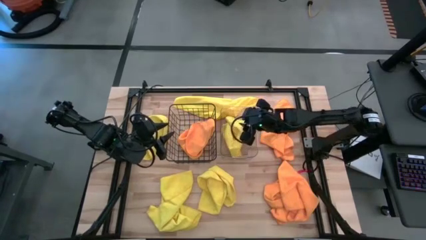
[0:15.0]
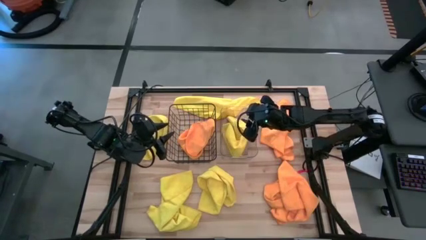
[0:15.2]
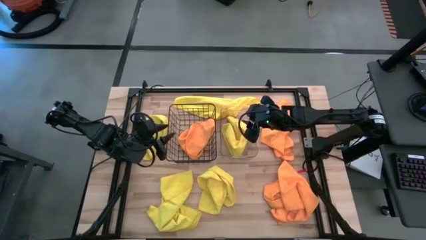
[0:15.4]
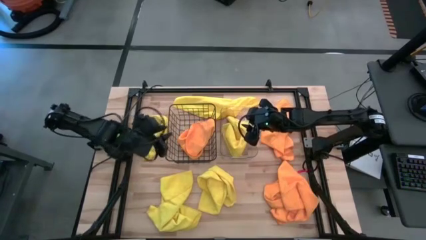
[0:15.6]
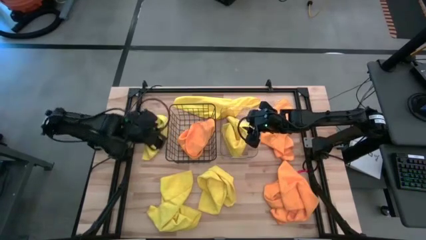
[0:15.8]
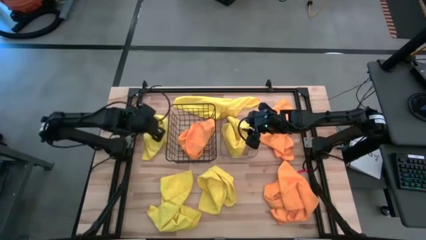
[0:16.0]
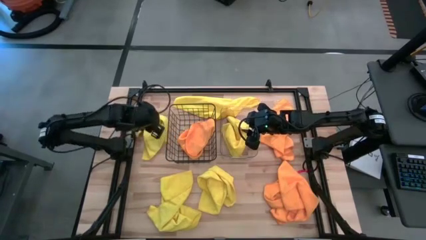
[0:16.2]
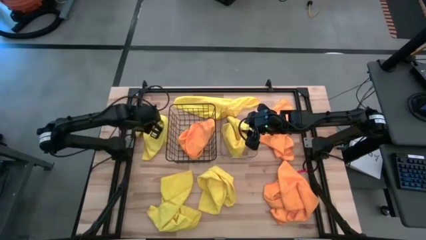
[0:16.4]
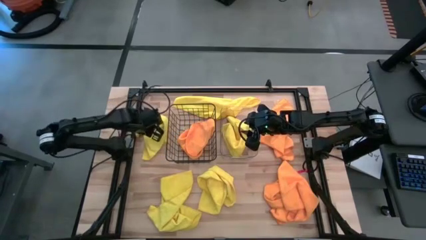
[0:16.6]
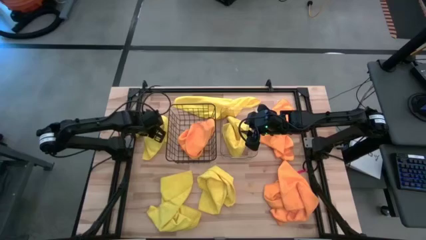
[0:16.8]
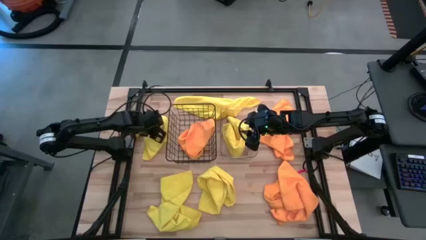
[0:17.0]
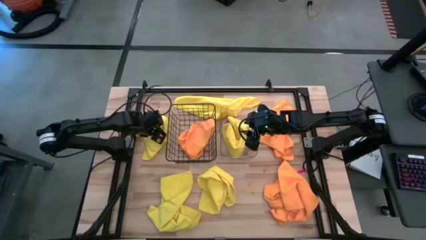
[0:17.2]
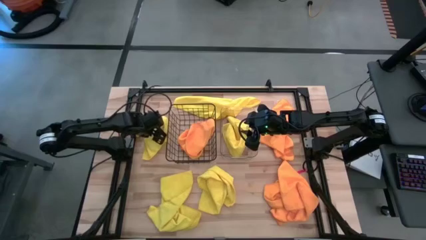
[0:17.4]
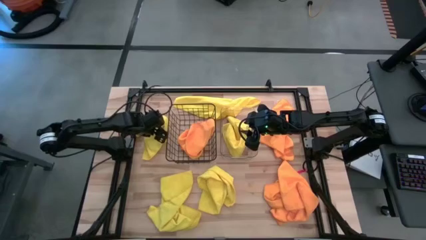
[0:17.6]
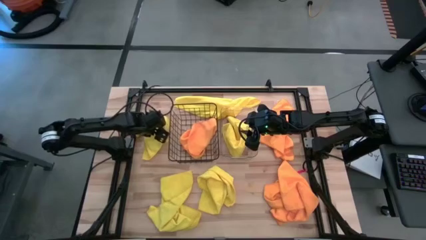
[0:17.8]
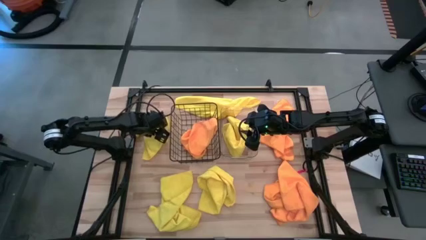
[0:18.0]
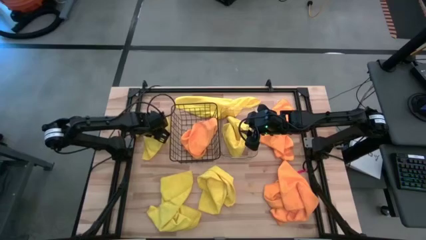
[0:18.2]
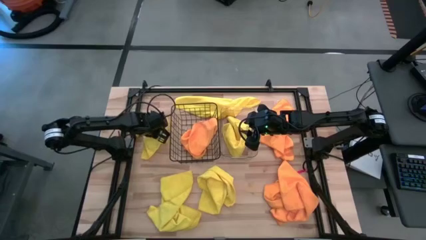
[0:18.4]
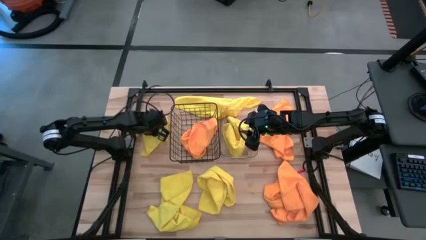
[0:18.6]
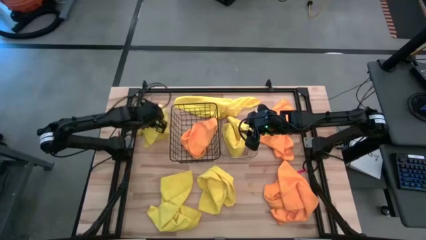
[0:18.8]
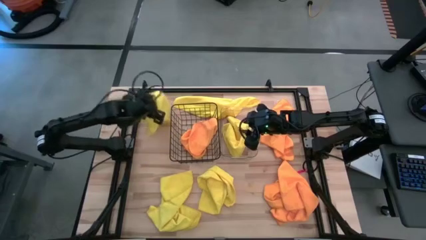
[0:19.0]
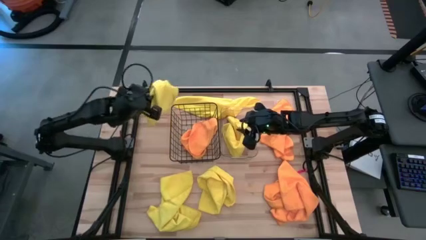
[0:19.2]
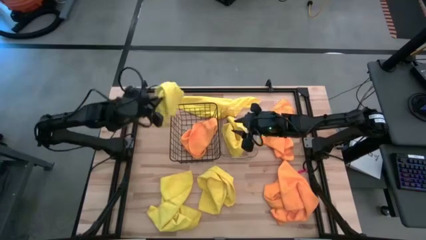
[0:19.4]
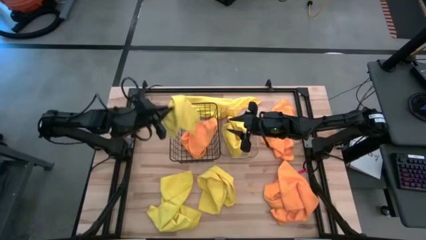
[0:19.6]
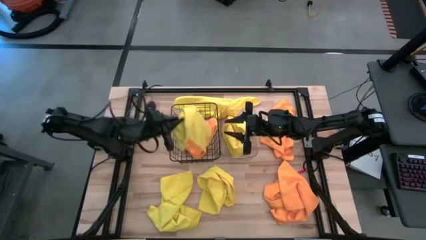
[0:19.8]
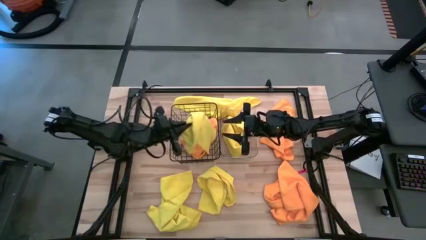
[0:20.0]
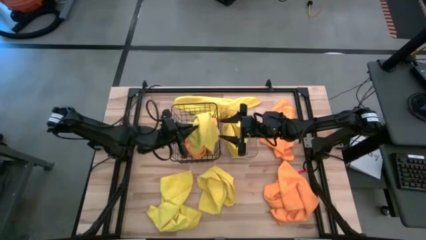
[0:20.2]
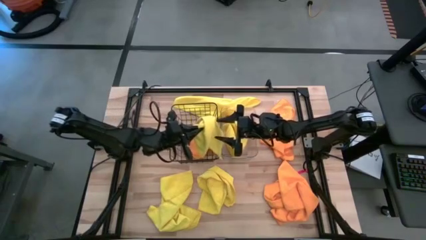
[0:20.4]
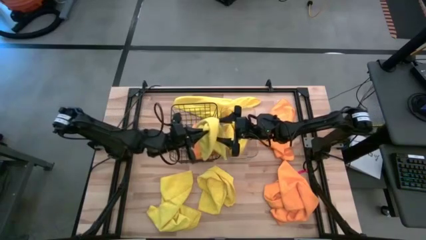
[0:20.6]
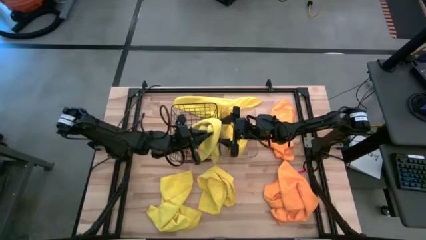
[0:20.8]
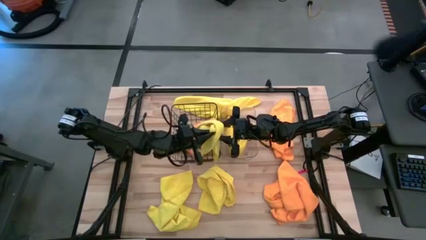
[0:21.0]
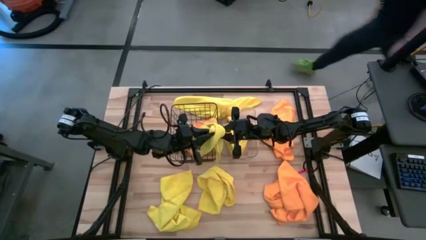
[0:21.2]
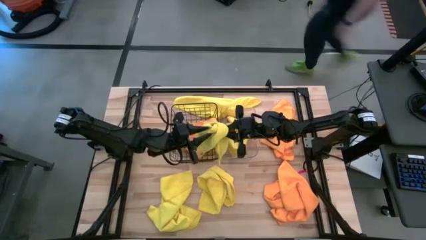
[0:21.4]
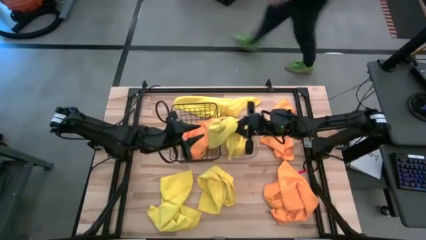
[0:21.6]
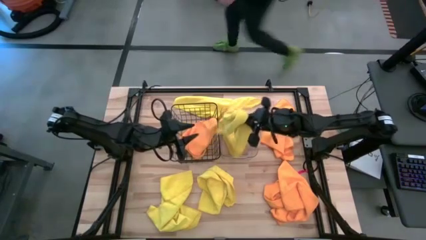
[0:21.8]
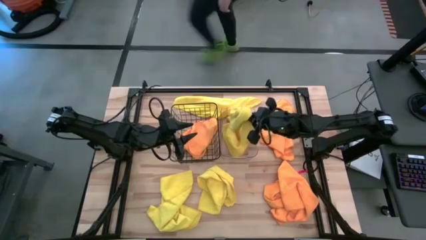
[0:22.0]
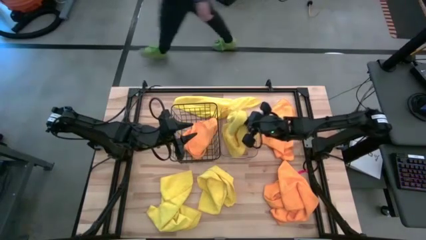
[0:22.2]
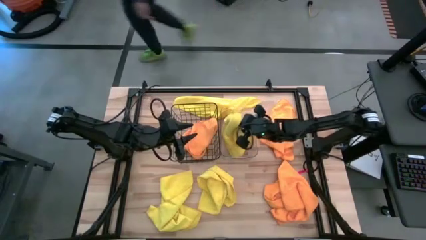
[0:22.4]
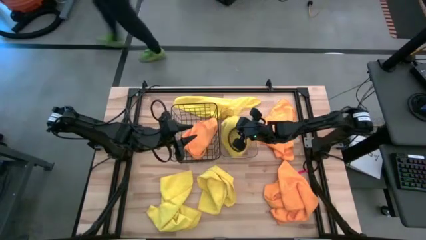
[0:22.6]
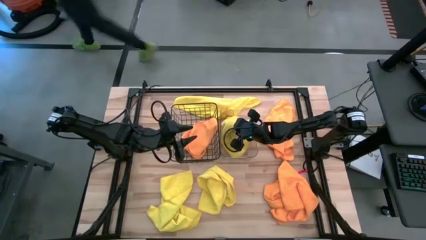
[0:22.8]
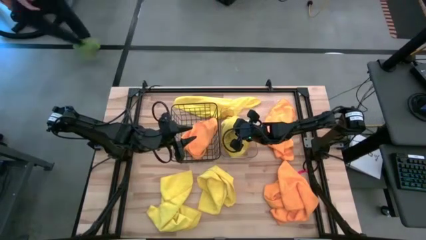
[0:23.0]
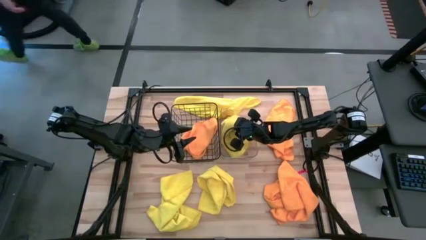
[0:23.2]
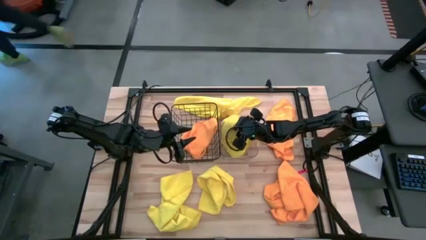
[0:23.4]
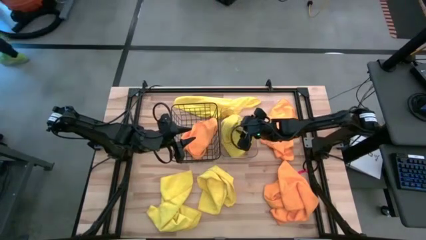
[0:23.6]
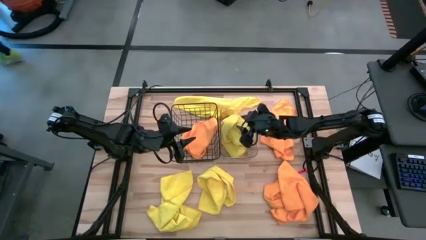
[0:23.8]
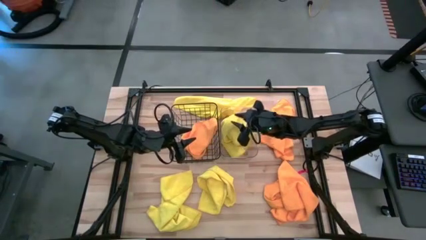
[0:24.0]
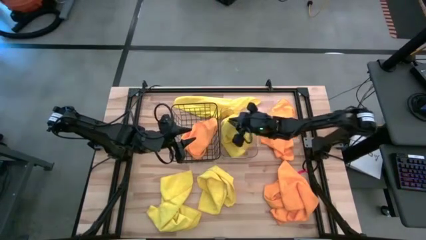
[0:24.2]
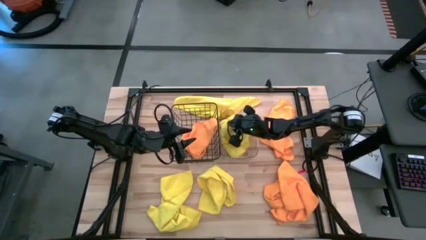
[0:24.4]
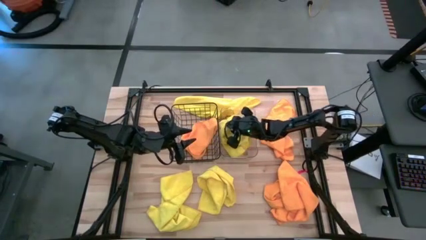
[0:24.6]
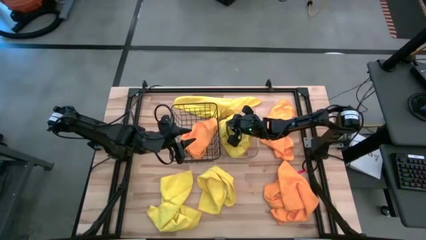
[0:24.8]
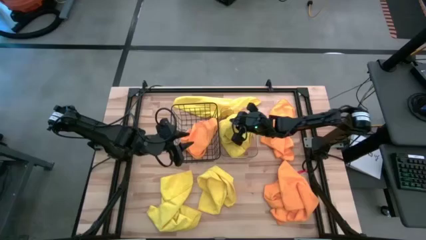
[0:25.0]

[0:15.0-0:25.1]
Task: Sort microfiber towel by color & place in baskets
Put the yellow microfiber towel into the transparent bin

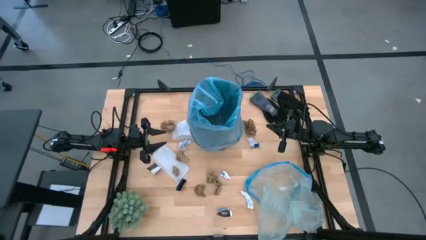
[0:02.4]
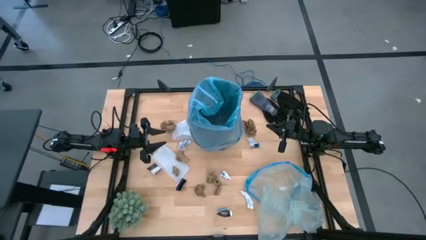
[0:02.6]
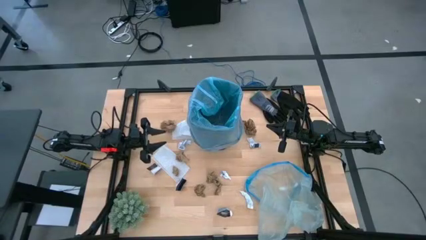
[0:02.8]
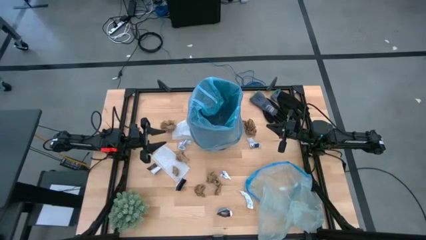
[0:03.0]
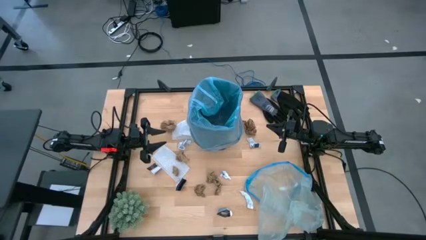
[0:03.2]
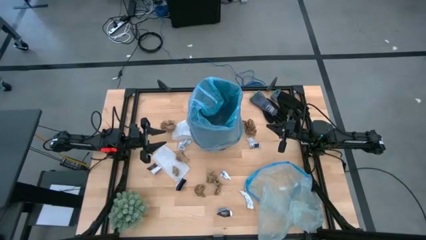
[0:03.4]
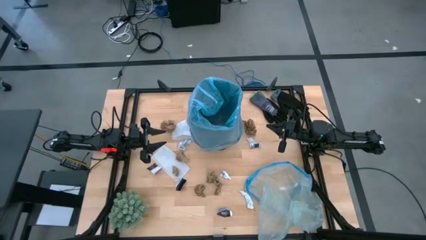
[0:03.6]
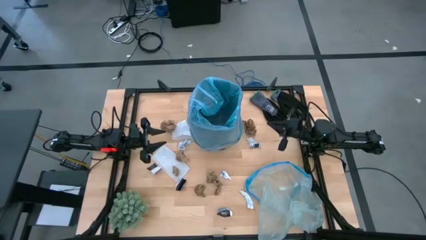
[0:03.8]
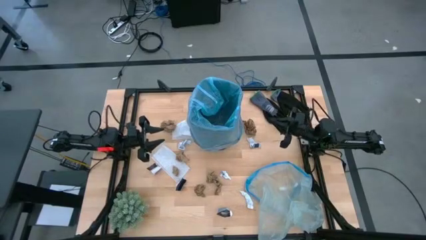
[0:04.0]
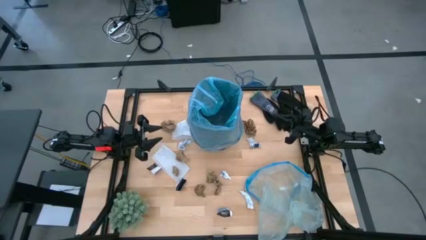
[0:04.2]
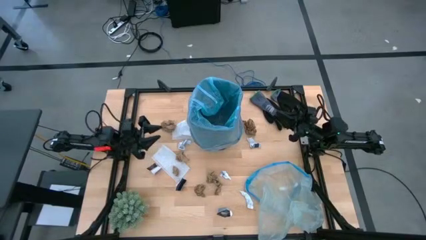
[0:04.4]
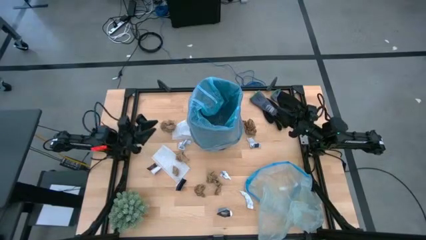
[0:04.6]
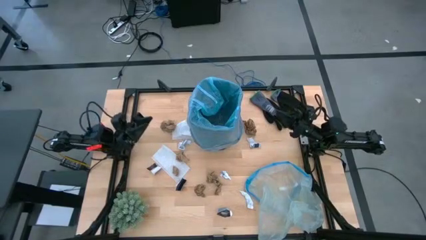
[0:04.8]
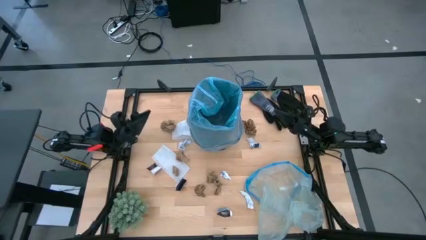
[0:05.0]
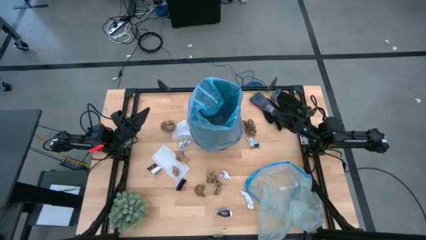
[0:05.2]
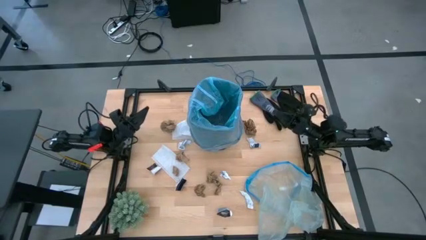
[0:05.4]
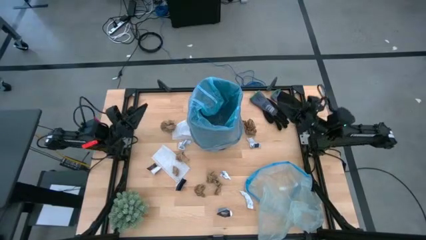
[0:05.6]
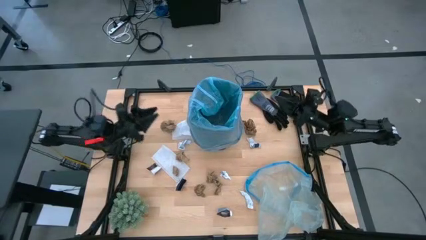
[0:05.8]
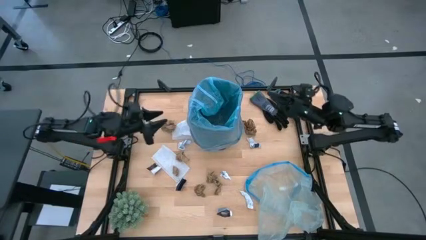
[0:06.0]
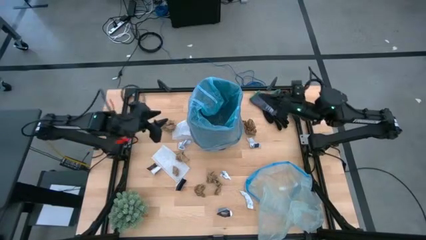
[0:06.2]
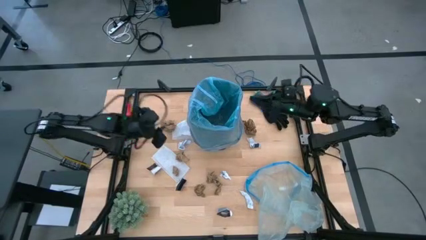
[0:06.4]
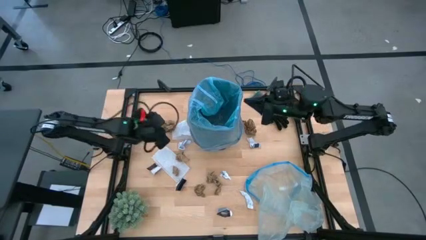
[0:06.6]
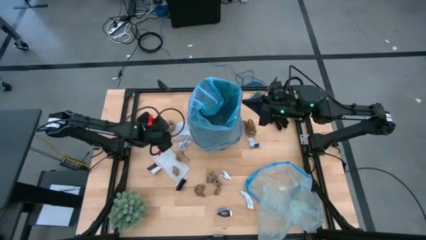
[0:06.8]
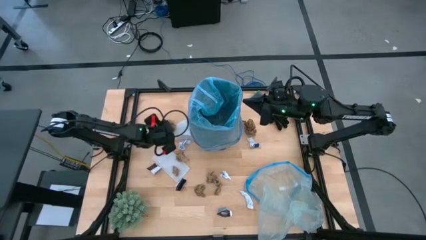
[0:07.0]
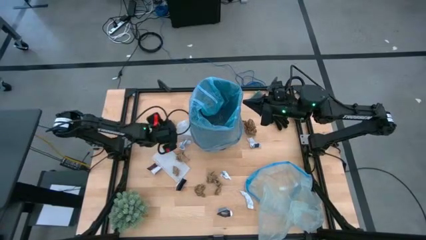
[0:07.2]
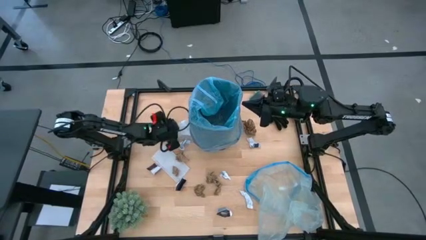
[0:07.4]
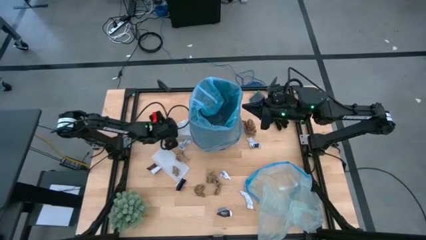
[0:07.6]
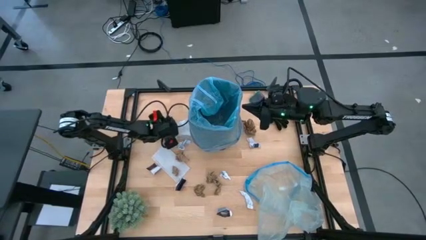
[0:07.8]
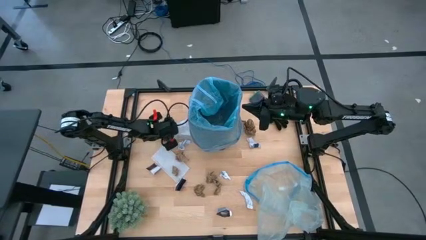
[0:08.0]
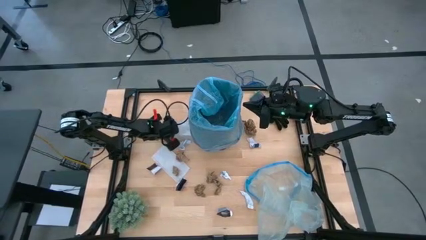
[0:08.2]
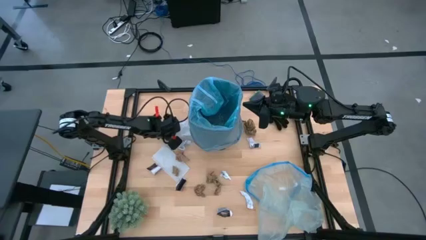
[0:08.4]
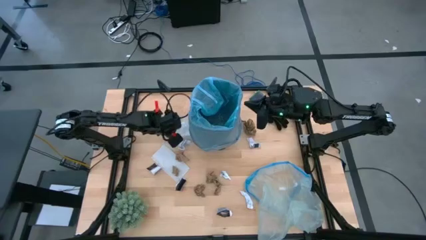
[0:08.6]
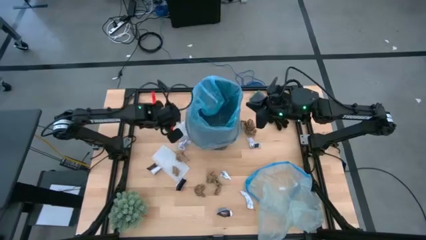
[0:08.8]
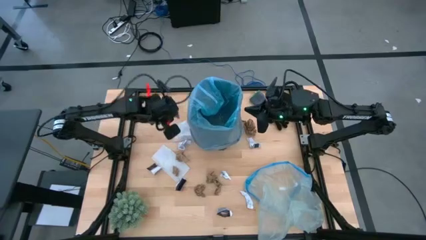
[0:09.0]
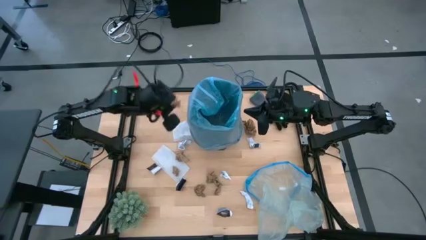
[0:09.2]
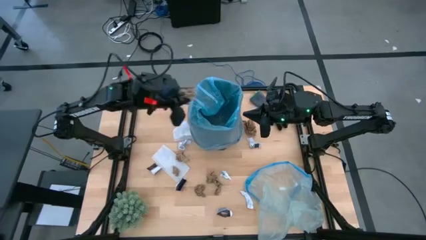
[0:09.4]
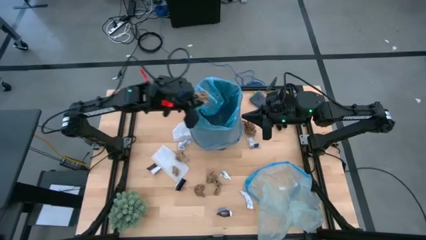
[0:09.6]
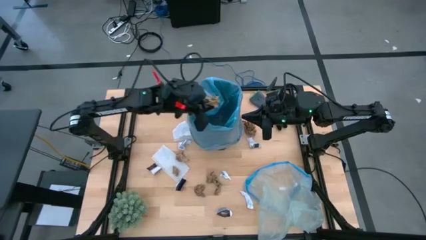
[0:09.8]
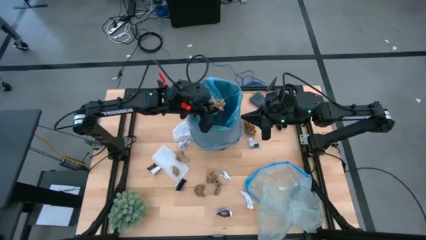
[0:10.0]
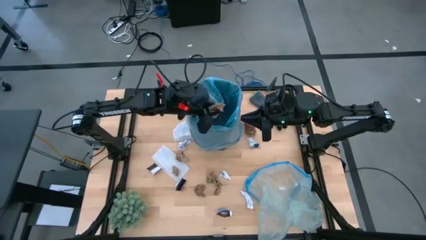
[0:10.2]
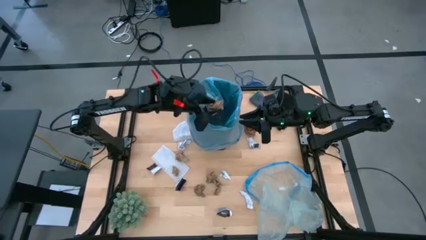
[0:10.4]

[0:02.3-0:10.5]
Task: place trash/remove bag and relplace
Put the brown napkin into the trash bin
